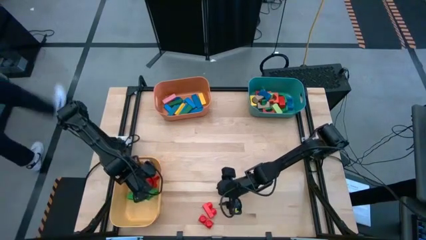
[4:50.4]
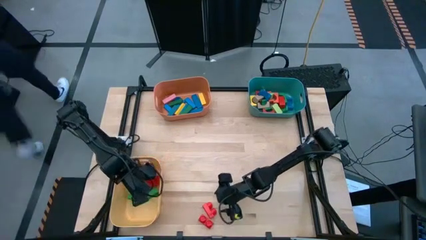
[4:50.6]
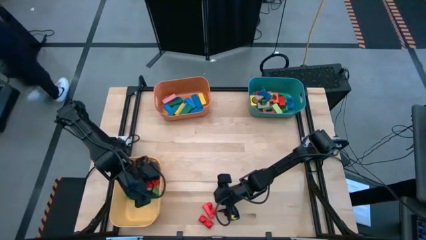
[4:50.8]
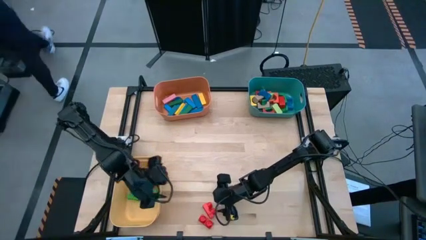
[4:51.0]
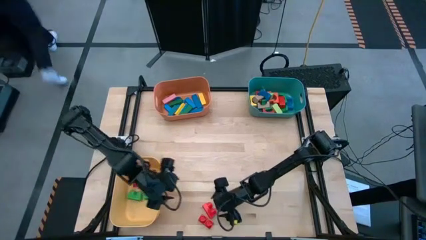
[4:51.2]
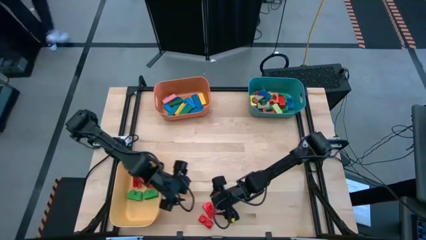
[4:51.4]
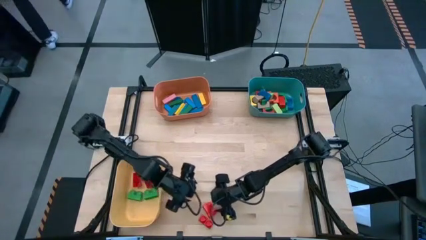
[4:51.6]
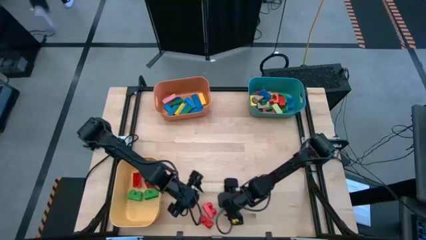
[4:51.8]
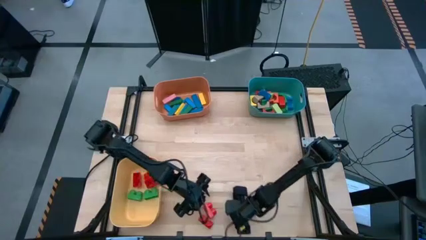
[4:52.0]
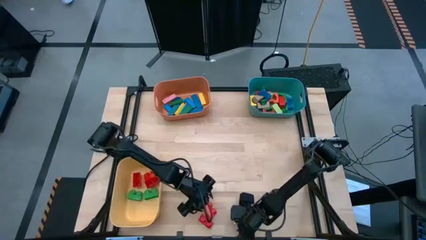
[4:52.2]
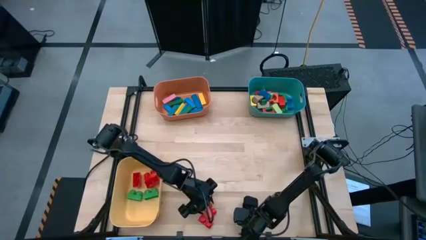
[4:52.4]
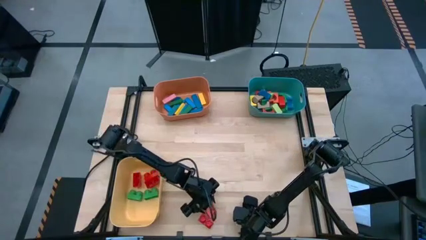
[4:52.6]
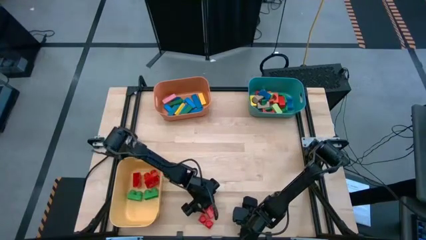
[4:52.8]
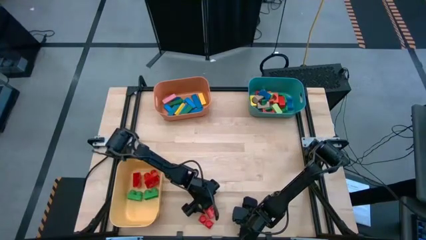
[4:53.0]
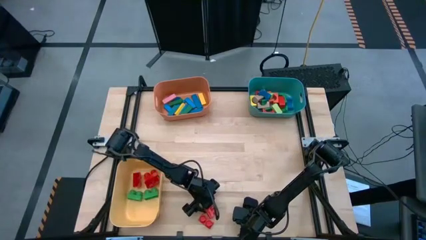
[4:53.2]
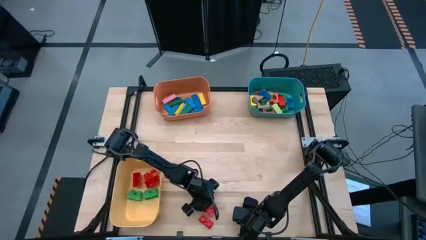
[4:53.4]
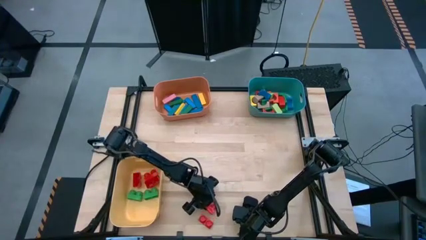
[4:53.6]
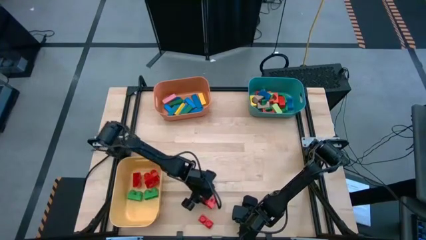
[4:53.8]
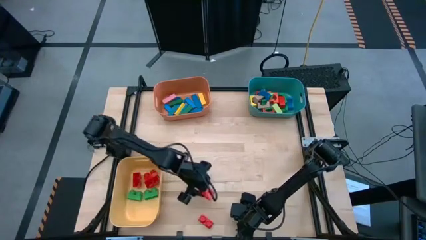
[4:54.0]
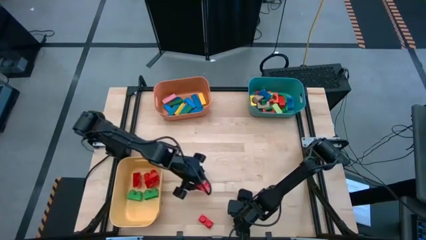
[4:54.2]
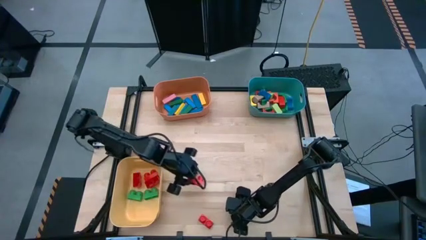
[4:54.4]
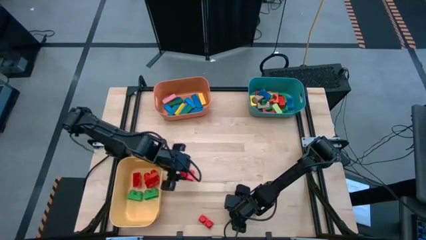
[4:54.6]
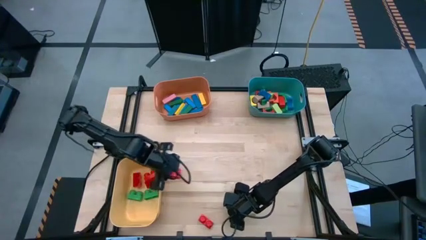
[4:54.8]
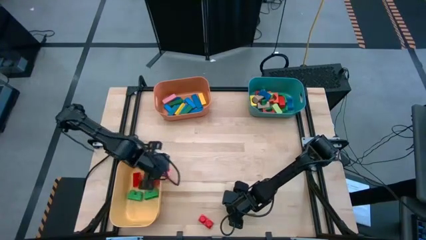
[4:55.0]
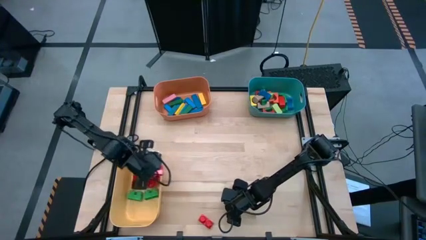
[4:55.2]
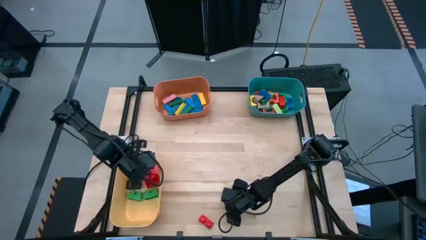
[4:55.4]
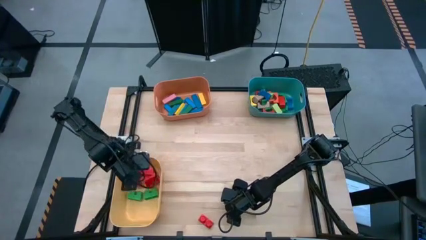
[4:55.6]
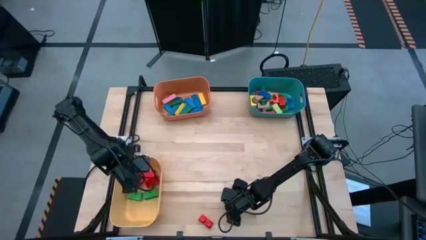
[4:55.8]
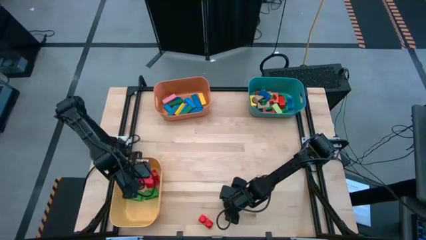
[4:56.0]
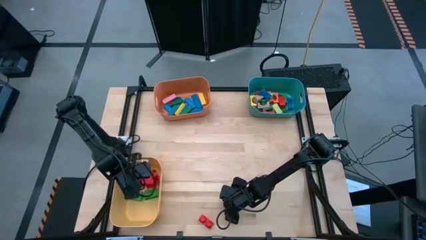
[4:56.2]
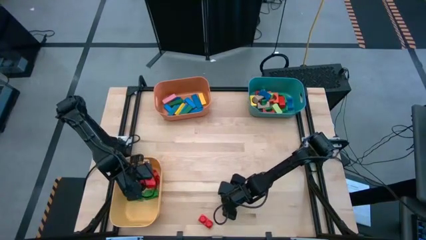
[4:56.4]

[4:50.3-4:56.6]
Task: Sort blocks by size
Put the red game piece into the yellow bin

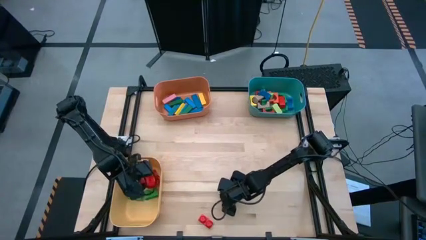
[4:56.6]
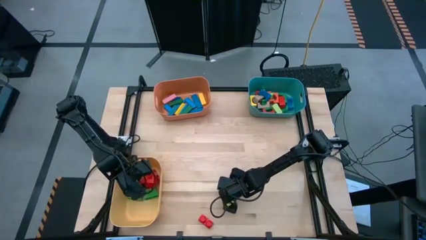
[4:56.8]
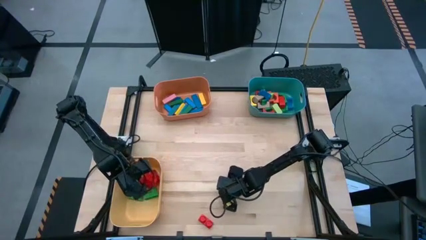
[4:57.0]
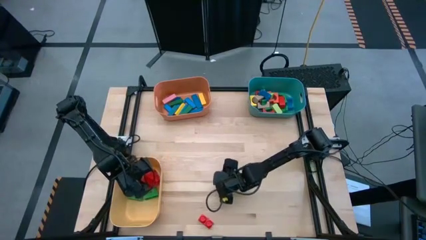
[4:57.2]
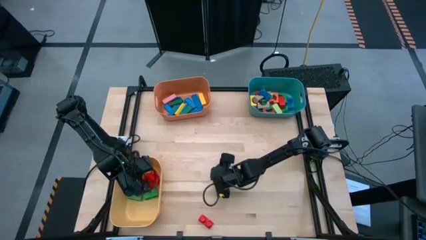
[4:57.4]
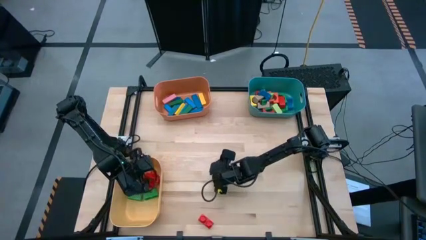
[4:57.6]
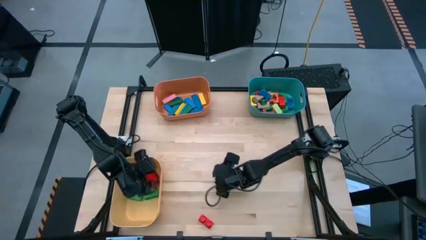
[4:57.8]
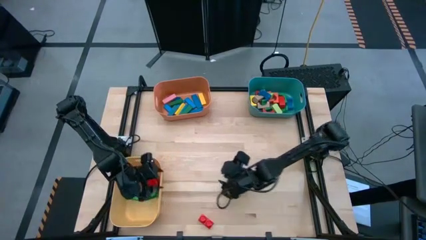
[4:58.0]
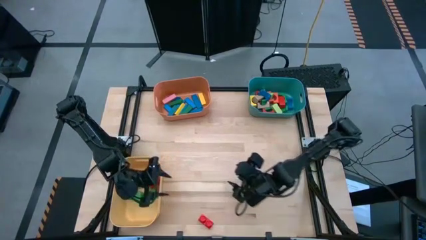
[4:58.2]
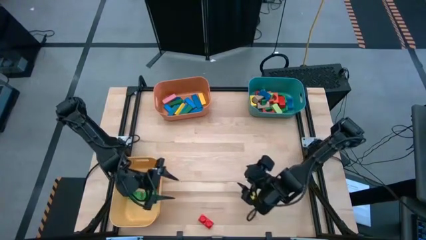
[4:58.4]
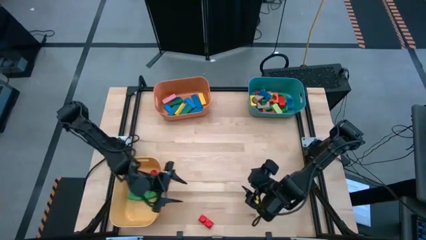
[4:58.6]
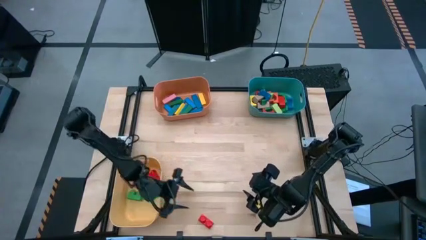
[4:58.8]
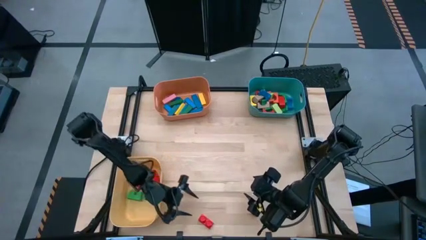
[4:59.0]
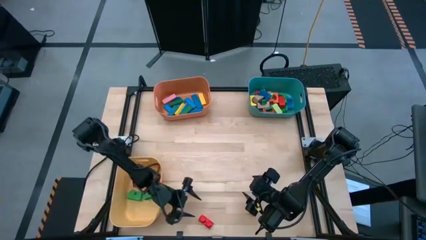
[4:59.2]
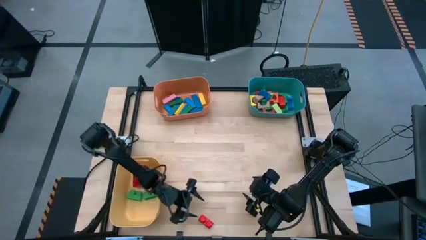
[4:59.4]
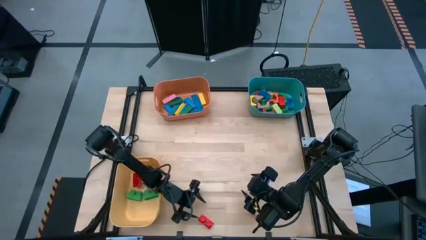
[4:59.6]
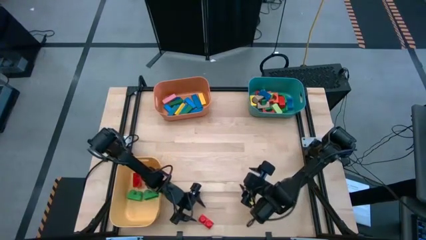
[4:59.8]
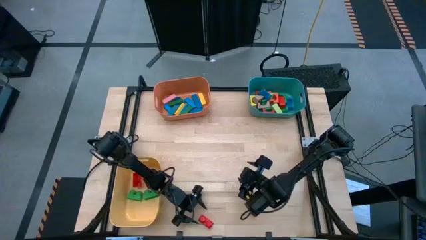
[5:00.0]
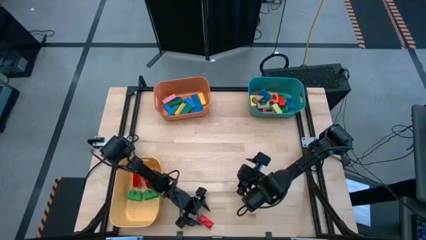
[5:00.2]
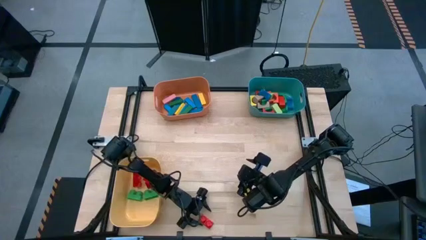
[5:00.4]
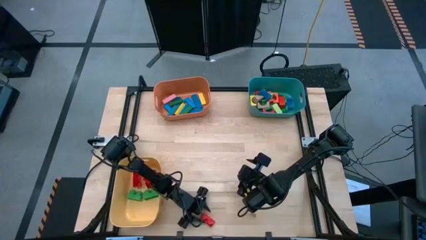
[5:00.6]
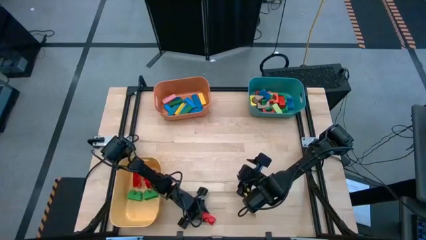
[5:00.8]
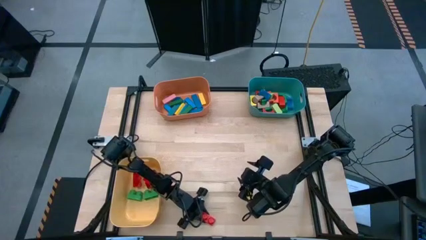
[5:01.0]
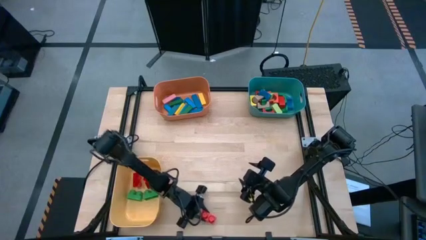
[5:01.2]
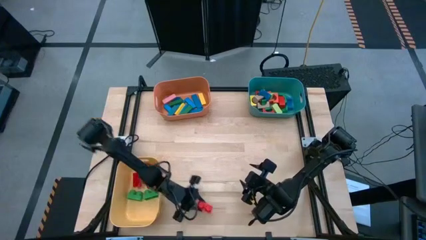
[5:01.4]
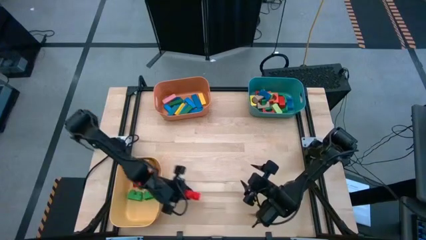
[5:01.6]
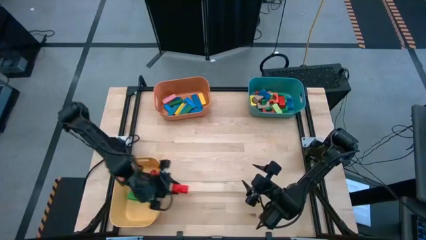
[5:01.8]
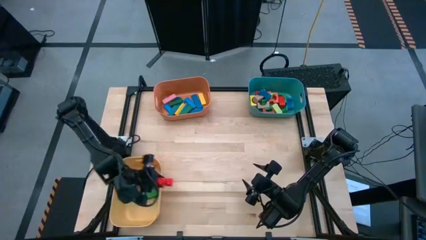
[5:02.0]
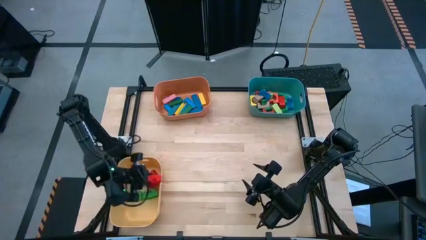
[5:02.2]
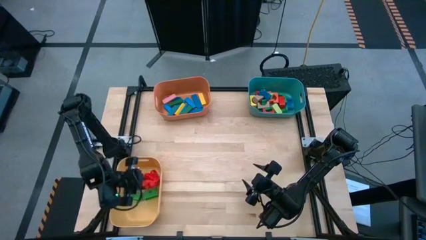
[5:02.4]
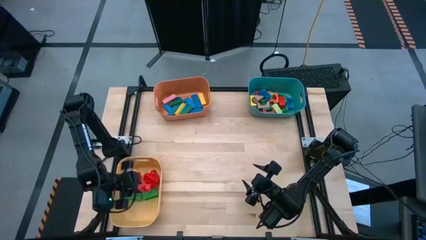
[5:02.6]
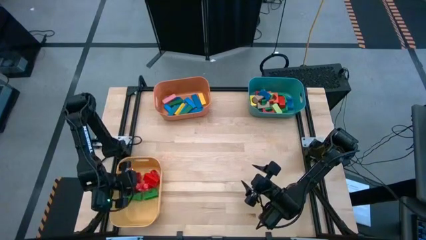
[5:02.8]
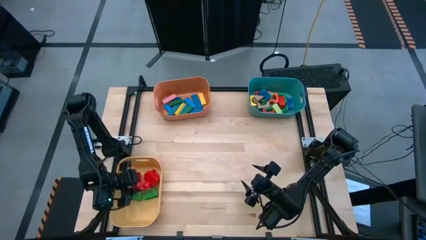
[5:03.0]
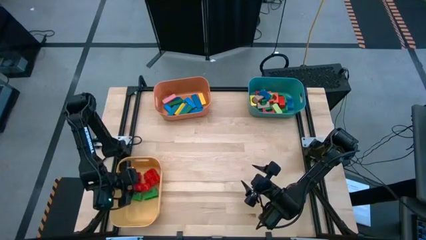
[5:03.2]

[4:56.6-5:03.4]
Put the red game piece into the yellow bin

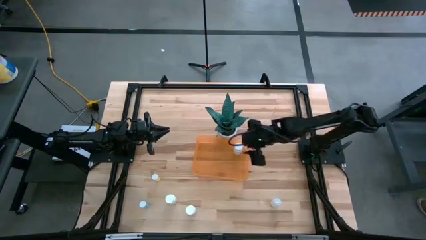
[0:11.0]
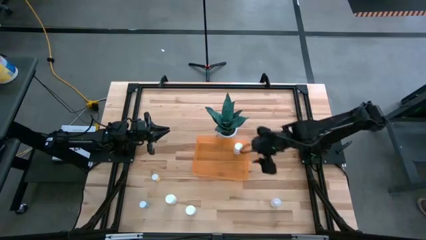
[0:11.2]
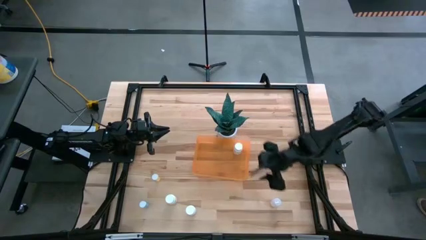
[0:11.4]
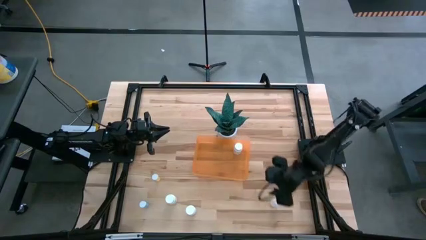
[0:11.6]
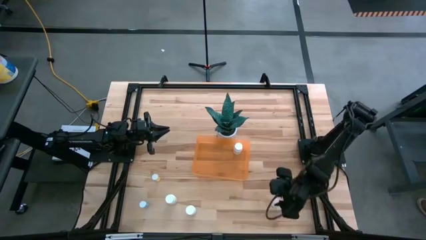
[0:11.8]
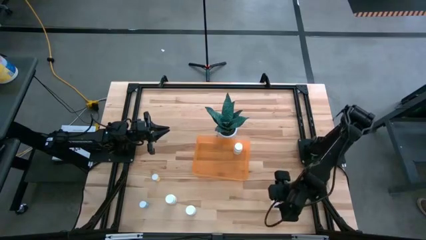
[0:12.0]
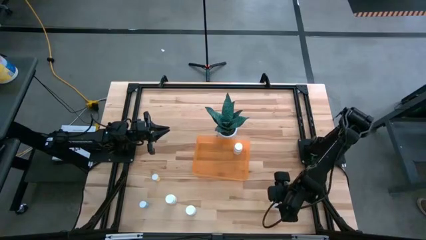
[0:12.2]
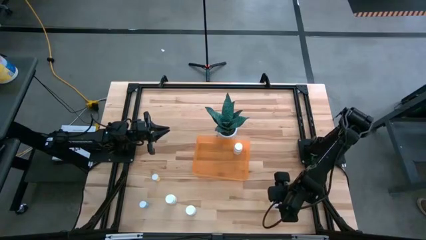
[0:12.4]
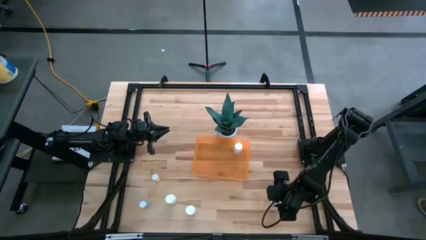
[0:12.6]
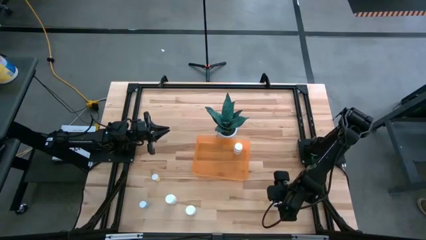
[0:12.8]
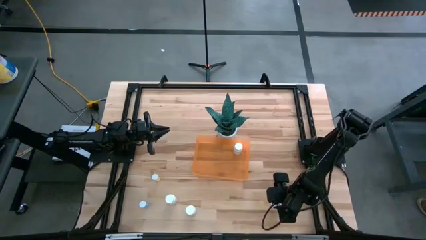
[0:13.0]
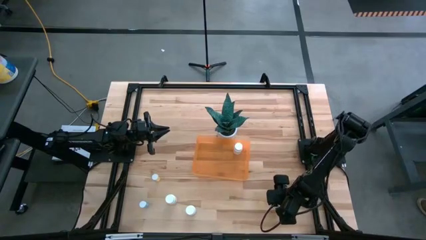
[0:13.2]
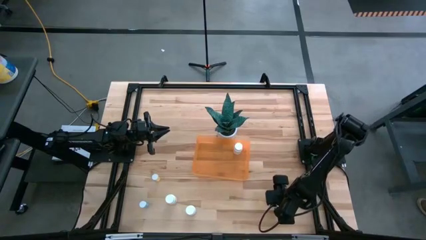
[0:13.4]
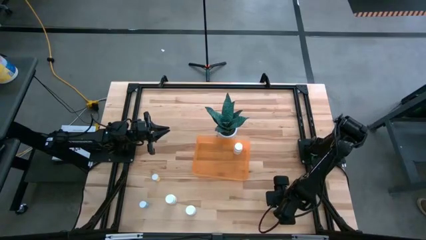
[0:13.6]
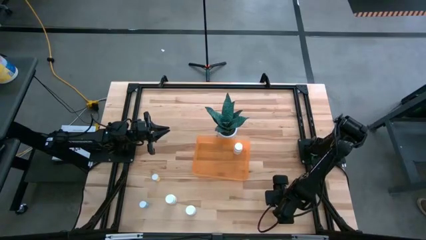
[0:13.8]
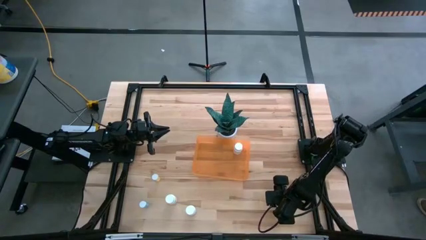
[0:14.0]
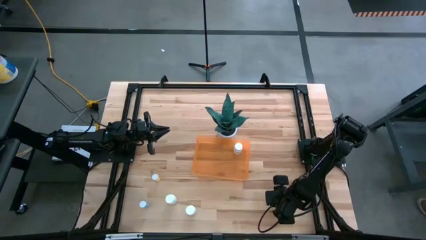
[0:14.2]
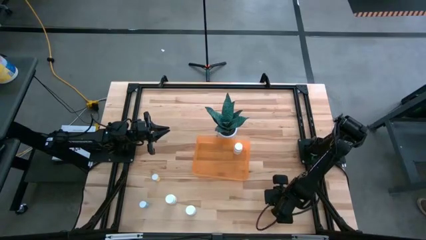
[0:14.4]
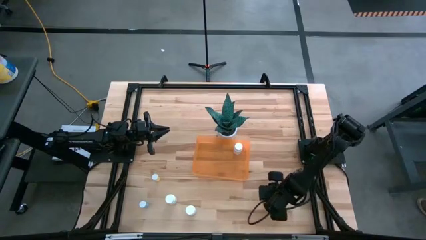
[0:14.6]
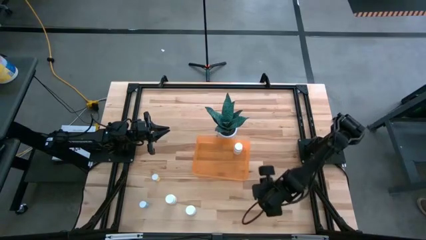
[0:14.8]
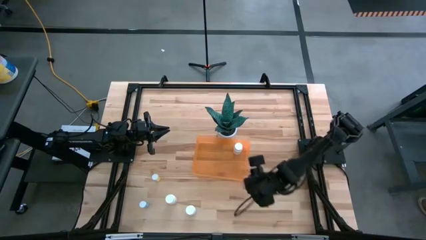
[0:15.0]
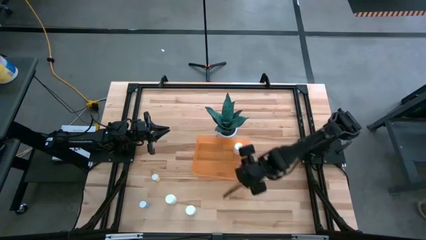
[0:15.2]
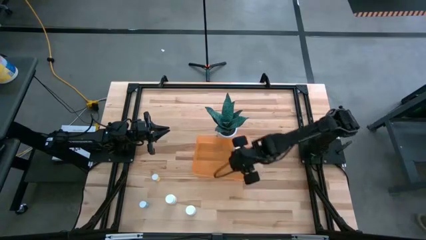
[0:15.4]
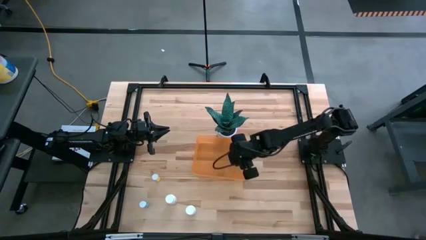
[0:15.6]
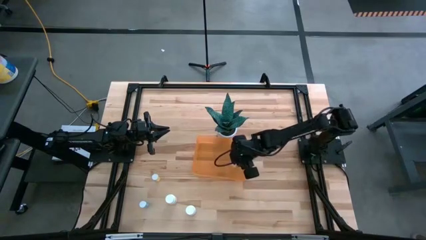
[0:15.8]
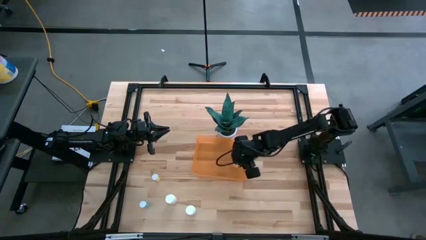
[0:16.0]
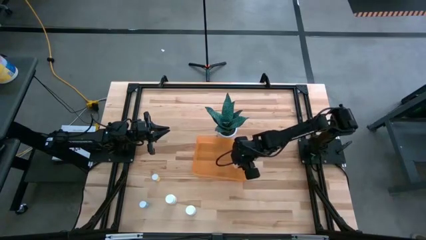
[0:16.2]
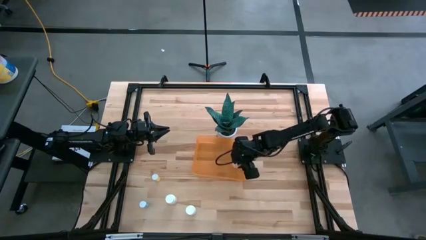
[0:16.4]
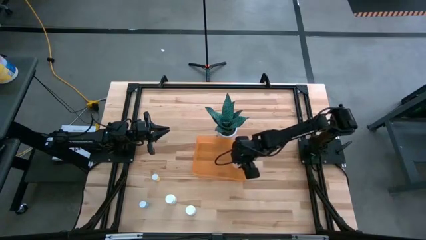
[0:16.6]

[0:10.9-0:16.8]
Task: Pick and place pill bottles into a basket
Put the transparent pill bottle into the orange bin
